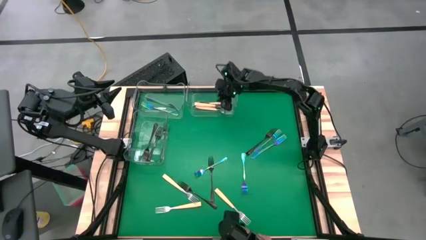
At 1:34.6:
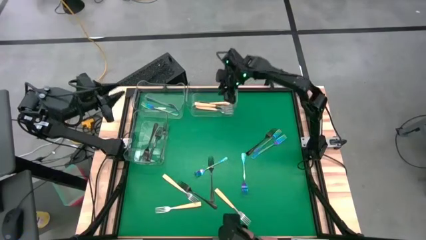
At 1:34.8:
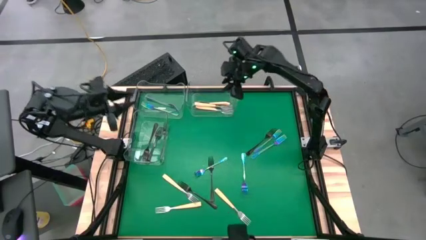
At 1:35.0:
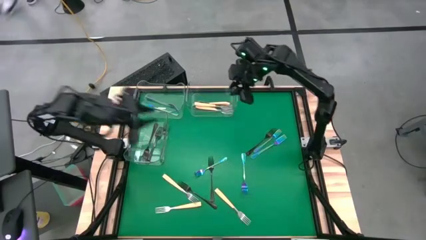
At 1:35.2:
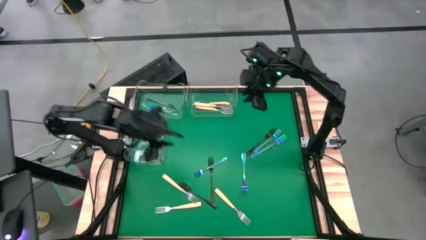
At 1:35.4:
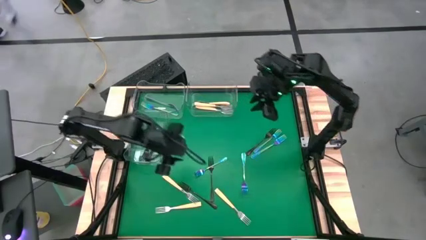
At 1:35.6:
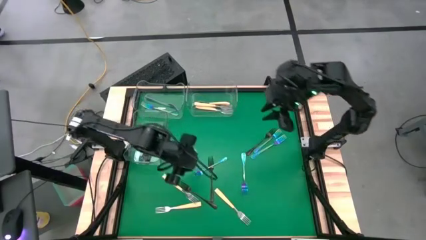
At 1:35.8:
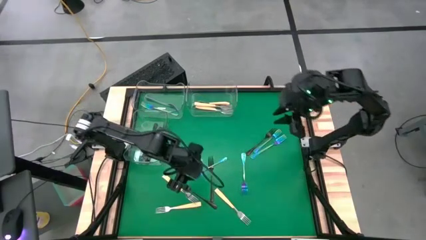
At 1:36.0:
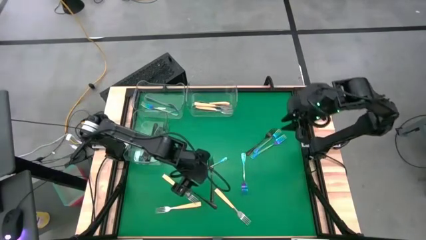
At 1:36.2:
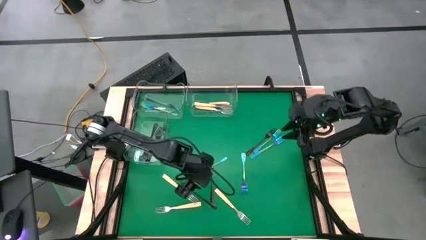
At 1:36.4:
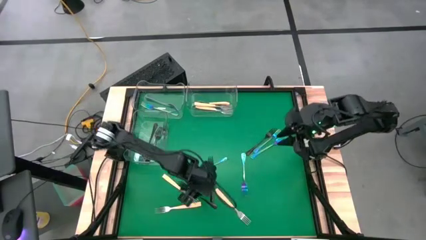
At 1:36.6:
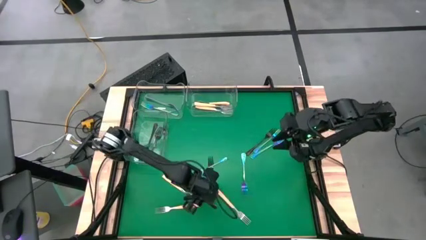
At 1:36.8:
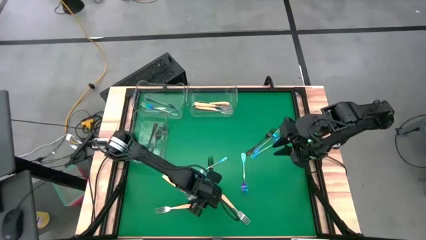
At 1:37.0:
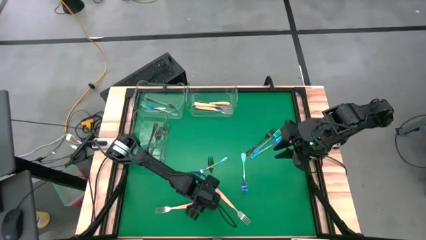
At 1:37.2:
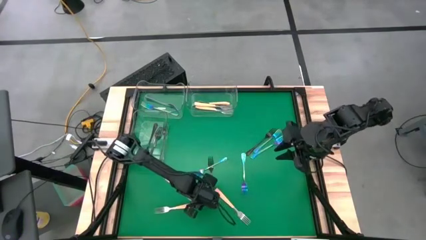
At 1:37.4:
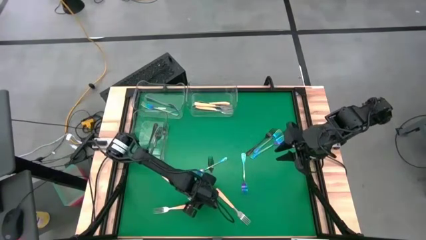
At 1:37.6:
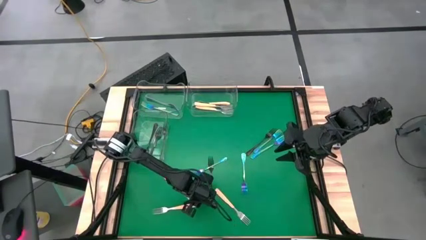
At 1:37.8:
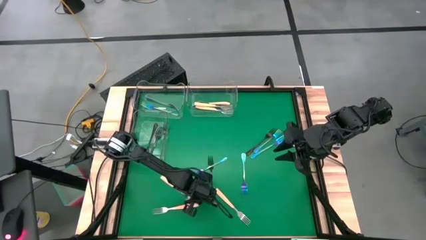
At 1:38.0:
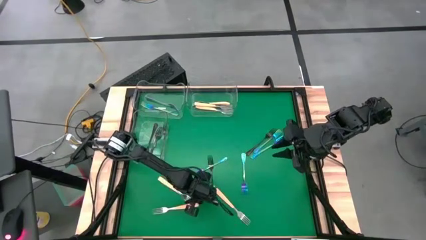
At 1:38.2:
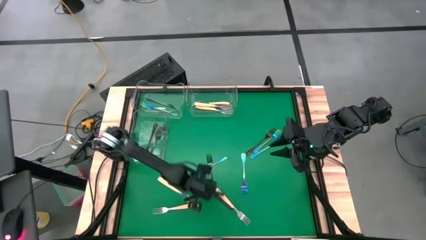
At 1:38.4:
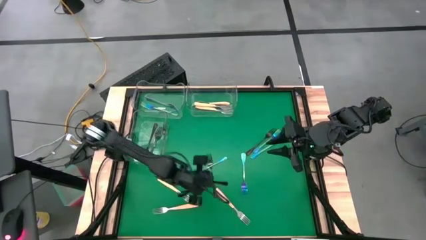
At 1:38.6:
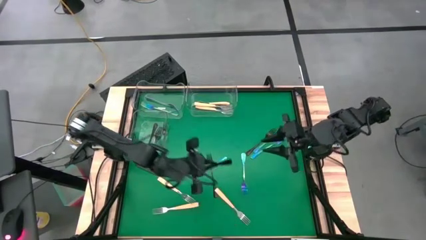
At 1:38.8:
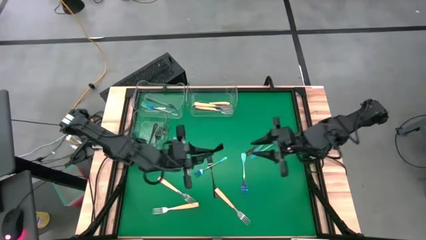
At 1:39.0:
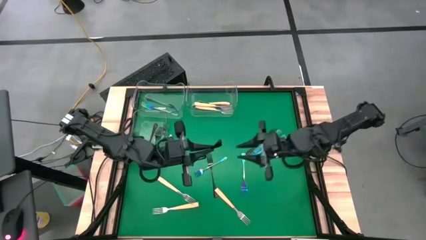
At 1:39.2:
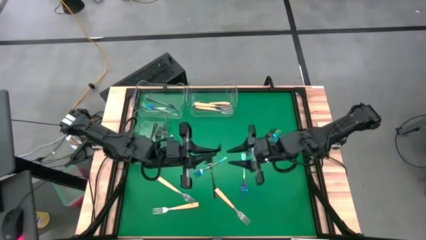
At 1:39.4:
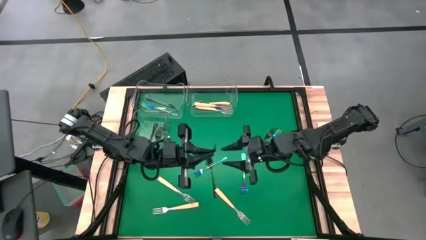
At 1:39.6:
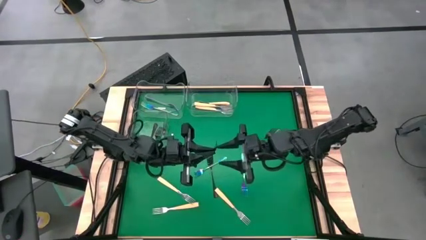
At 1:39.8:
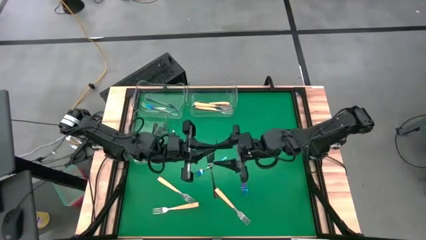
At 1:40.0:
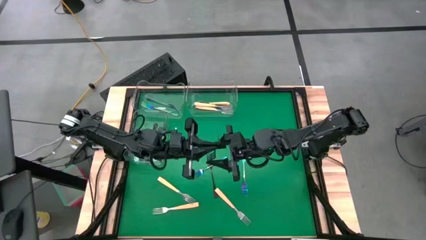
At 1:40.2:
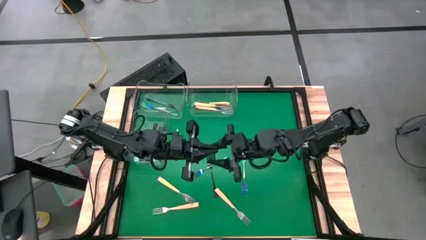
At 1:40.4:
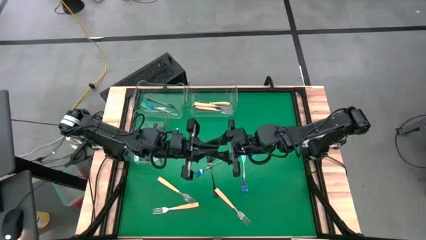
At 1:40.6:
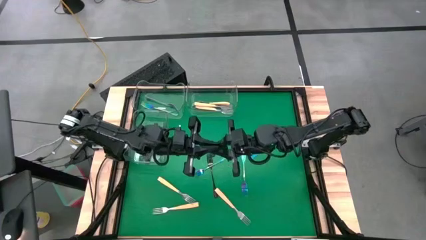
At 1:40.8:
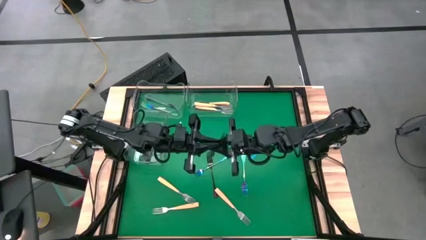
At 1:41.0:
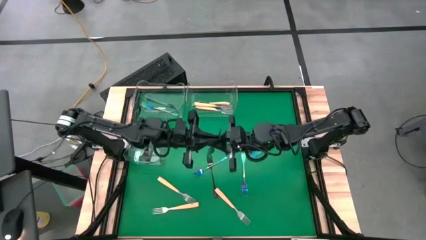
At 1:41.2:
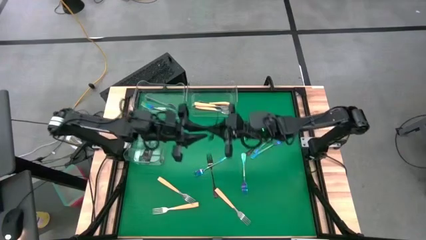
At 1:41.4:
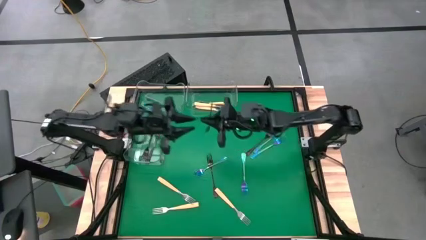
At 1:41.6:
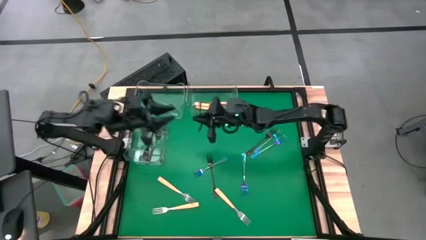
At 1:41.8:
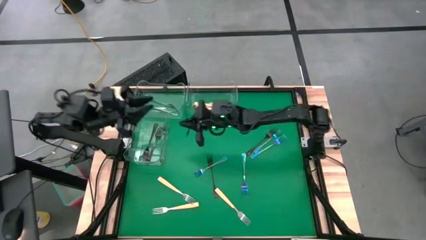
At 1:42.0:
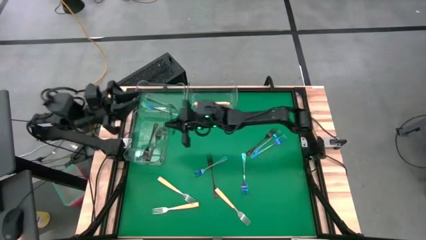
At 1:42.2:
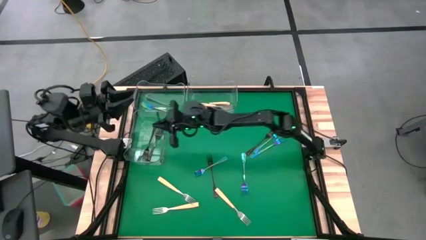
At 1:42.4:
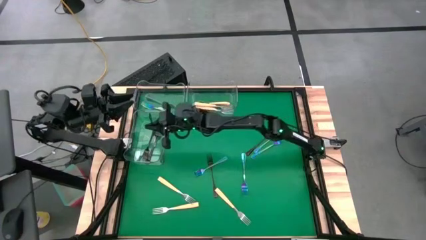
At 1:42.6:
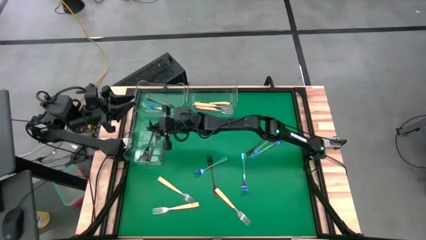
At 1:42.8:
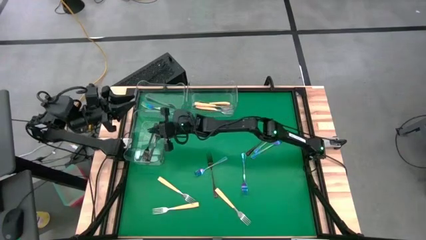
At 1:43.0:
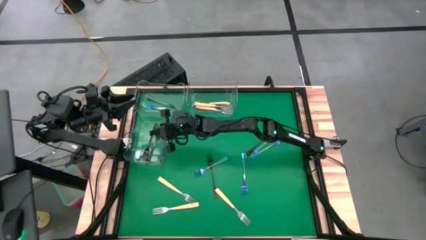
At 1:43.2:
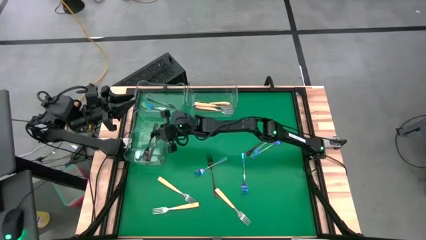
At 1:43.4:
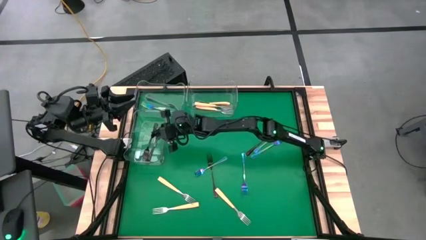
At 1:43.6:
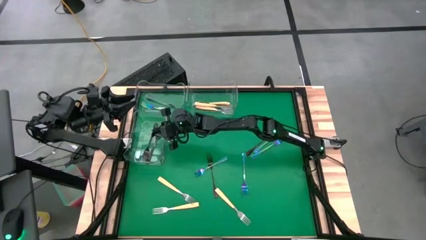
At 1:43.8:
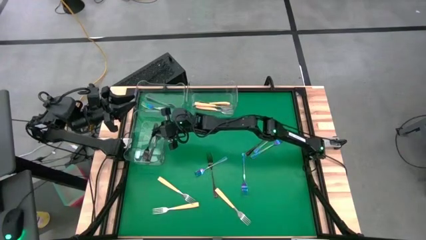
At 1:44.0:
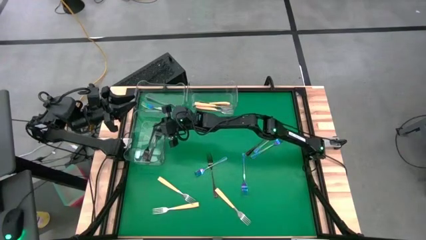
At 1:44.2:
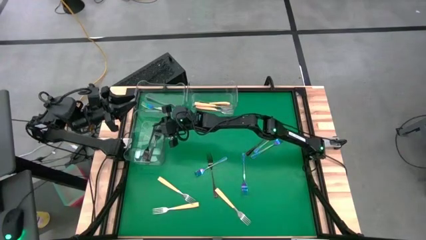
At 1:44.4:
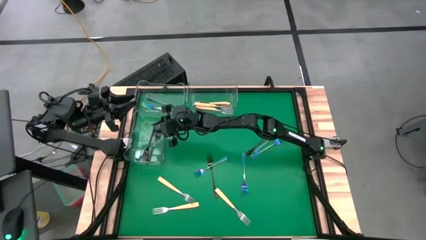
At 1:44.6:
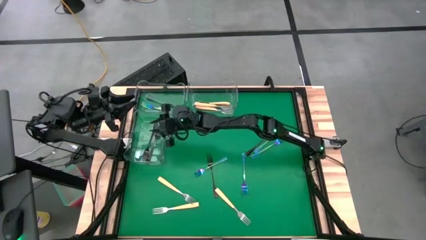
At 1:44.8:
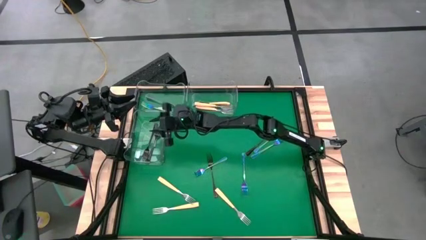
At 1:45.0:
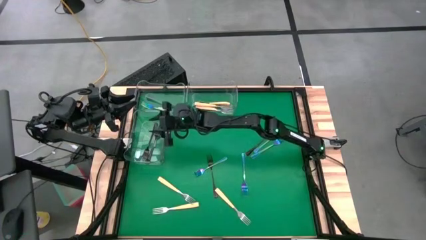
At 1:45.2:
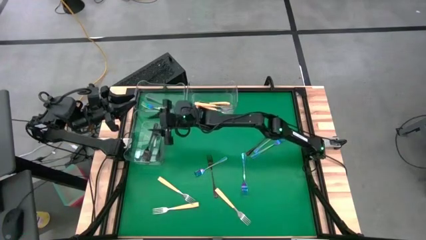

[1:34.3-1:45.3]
Task: Sort silverware by color (type)
Put the black fork into the middle left transparent bin
